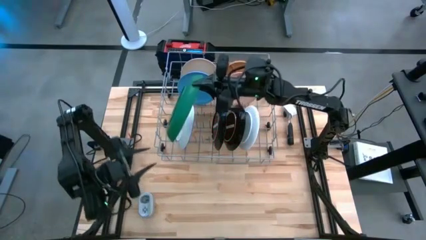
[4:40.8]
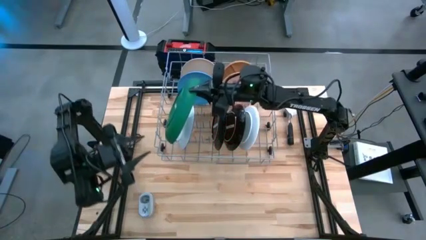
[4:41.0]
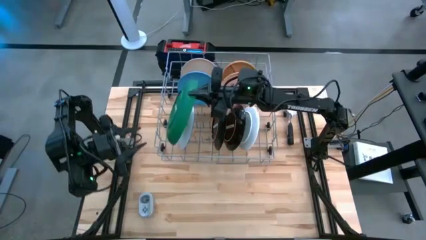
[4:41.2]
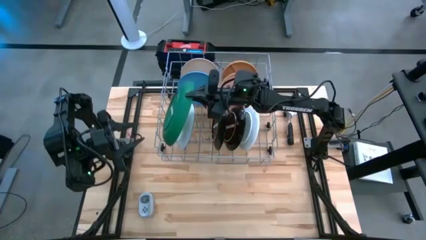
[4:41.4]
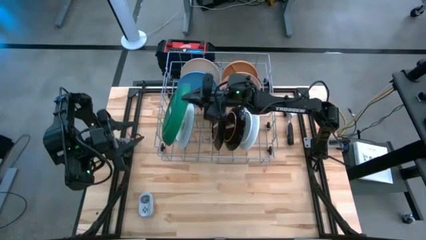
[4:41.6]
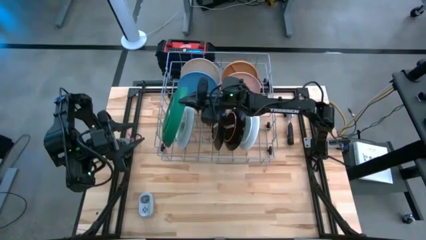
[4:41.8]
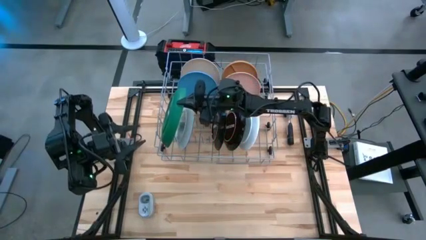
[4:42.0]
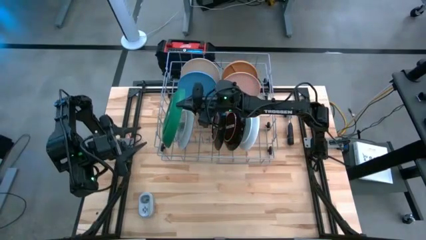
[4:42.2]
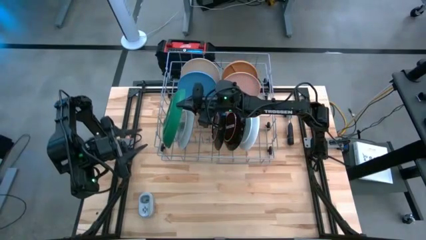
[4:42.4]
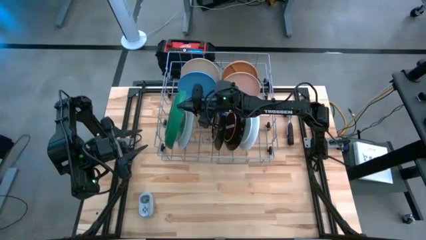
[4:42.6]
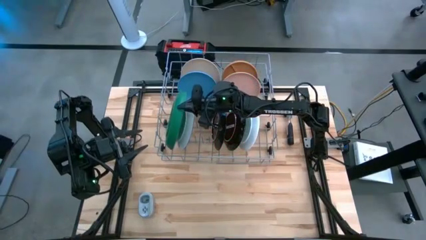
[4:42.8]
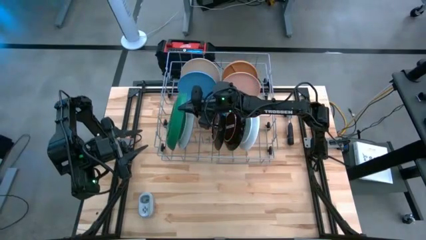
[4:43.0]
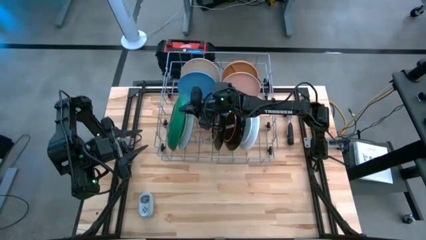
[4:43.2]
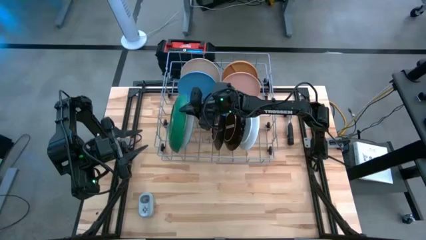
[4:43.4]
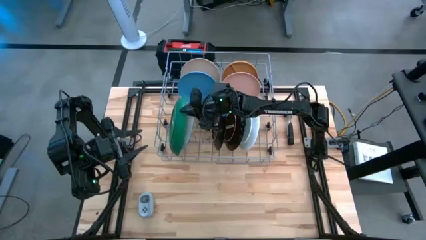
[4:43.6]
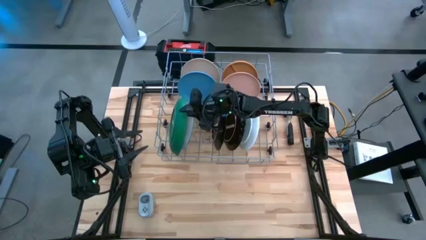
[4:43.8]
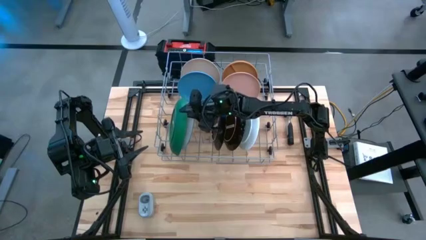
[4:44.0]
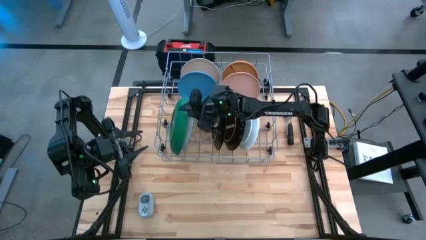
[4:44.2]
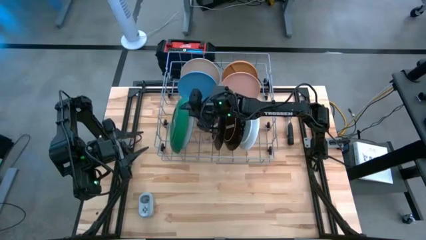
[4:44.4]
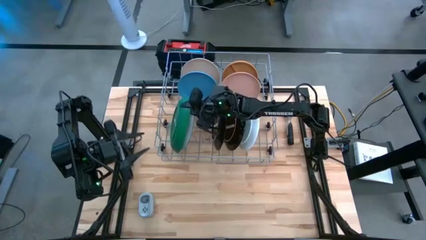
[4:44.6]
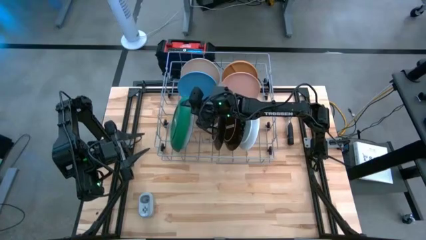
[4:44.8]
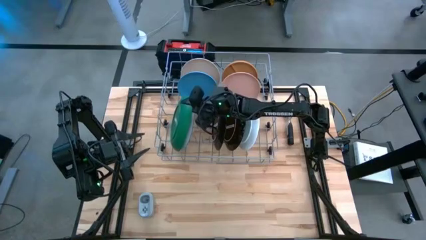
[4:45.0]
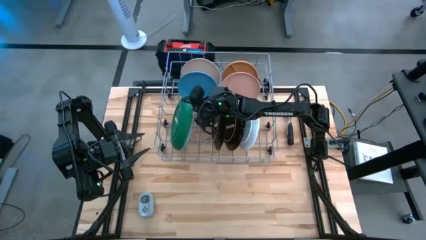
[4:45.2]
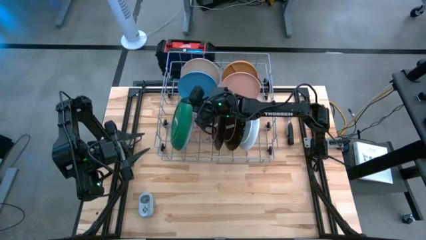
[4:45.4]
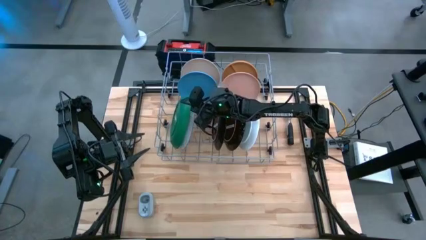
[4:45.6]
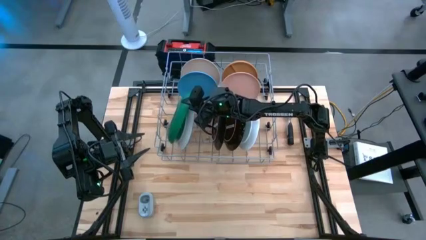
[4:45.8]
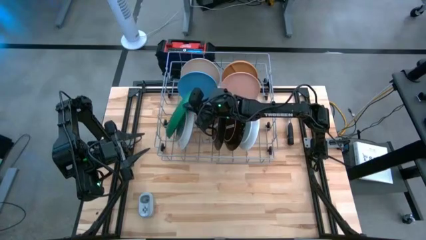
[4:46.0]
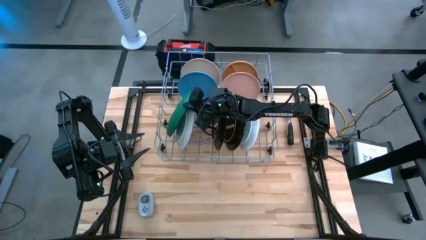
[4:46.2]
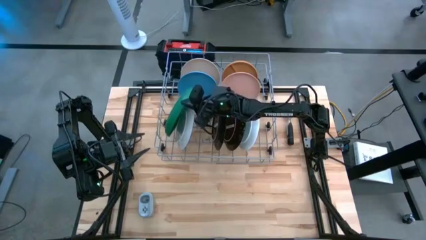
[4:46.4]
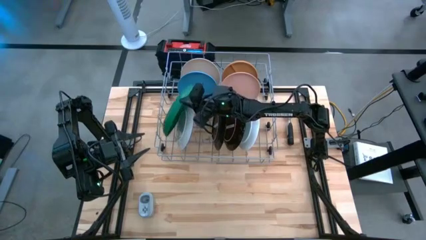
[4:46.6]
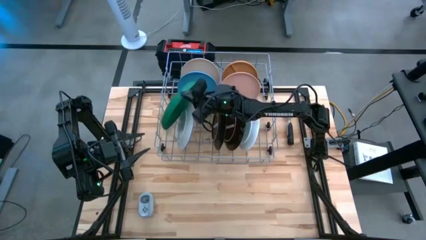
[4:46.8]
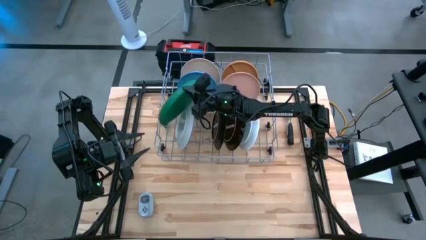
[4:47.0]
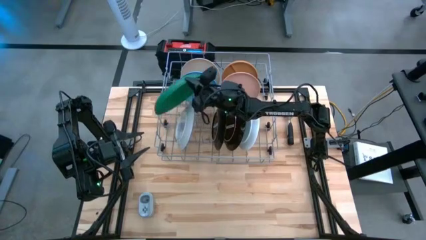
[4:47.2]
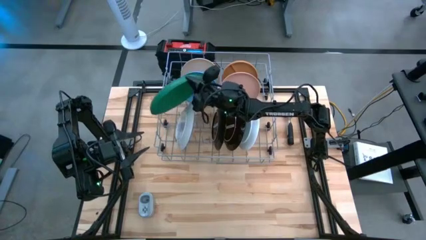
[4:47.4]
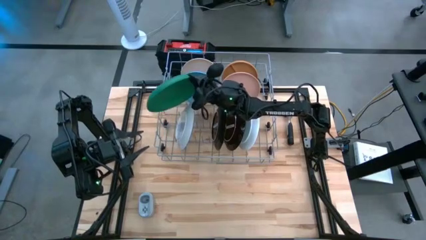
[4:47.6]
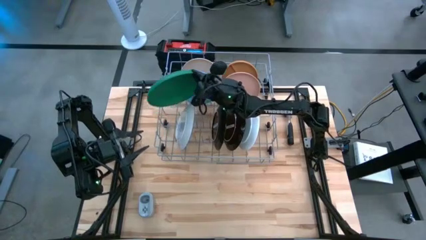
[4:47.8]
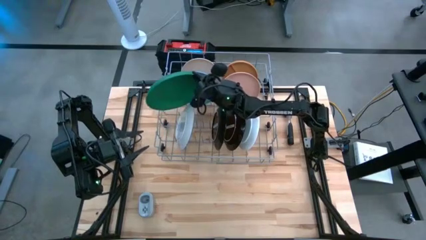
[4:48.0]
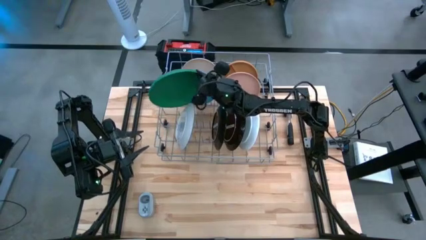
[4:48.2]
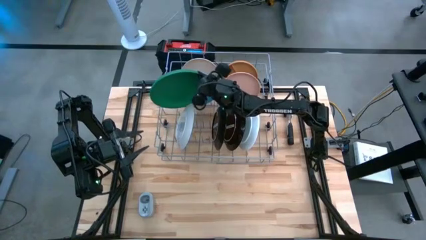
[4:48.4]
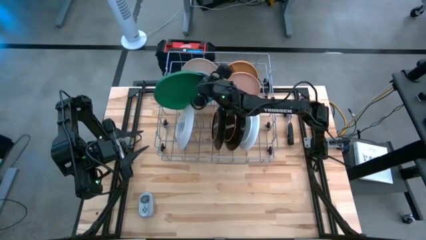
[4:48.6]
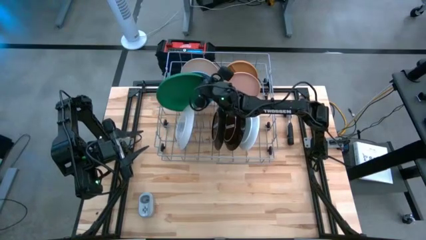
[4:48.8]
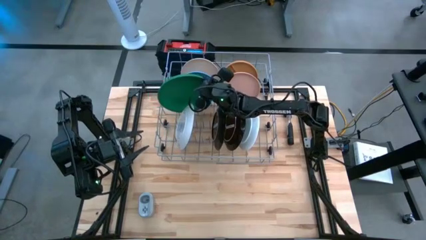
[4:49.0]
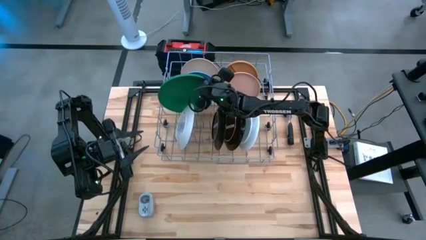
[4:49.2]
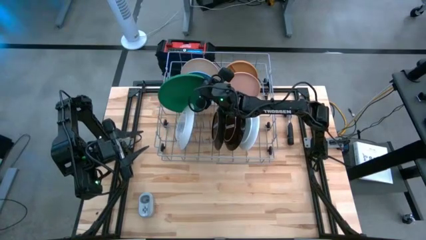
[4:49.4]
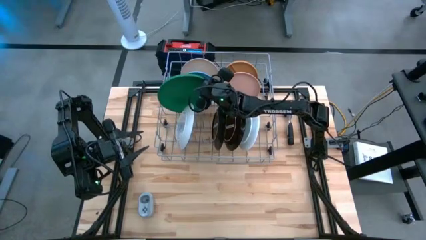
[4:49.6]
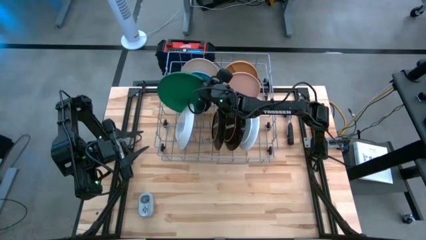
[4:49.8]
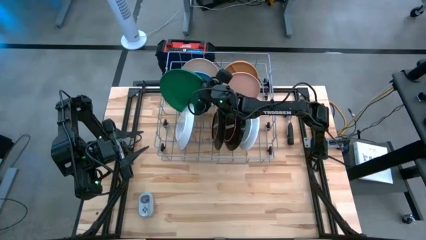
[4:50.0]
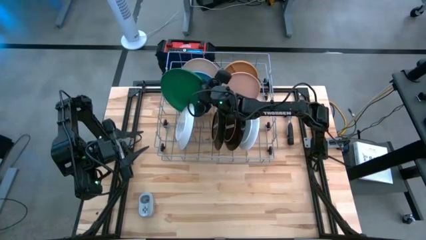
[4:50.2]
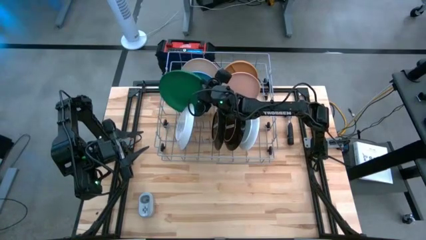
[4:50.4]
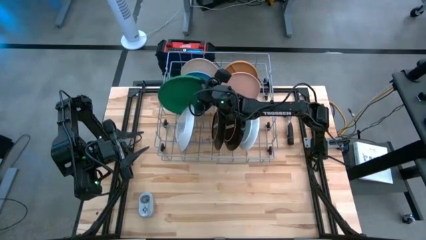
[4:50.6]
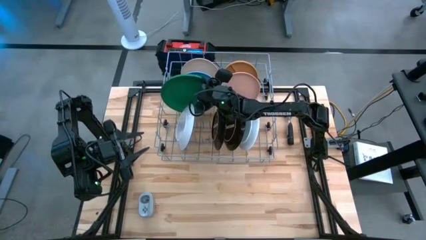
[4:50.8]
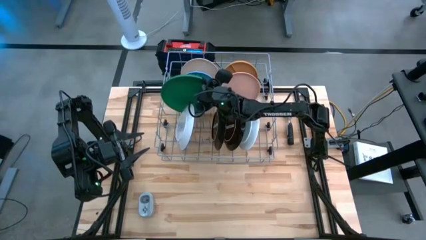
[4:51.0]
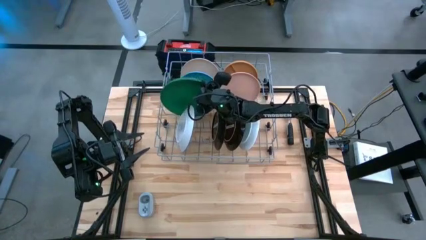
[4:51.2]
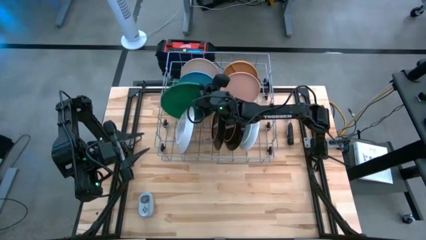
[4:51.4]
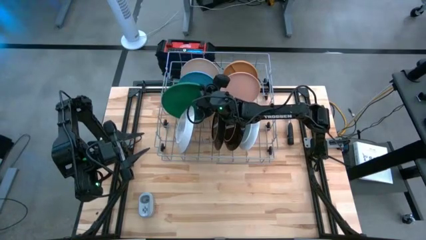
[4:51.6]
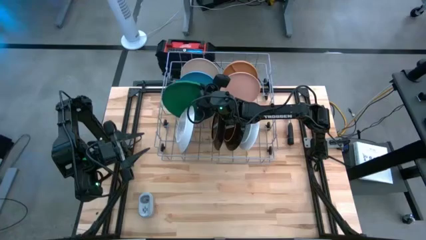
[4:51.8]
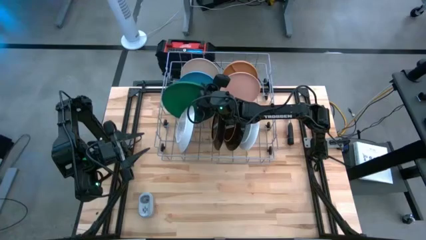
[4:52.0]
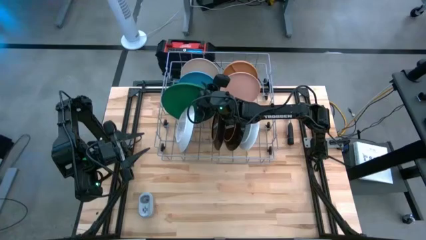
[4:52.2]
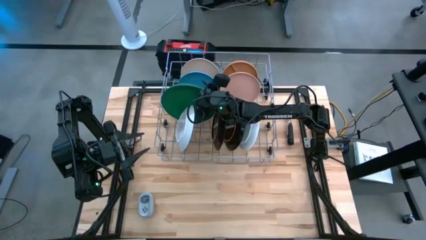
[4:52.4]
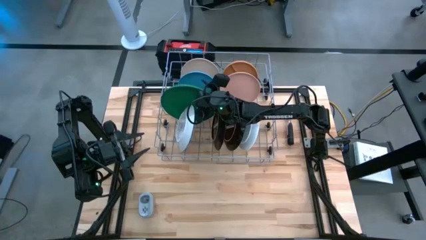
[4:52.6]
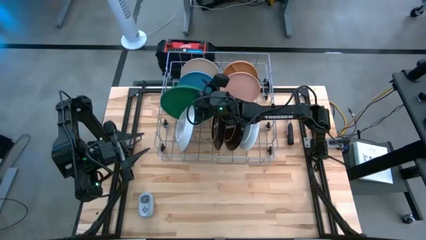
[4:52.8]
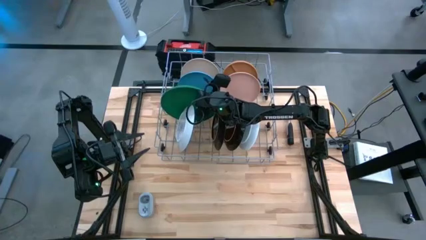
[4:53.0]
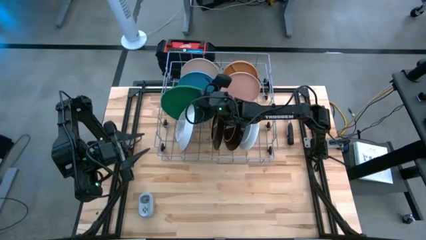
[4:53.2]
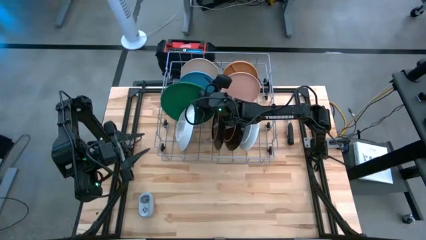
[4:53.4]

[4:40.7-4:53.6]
Task: Sort dishes
Put the green plate into the dish rack
